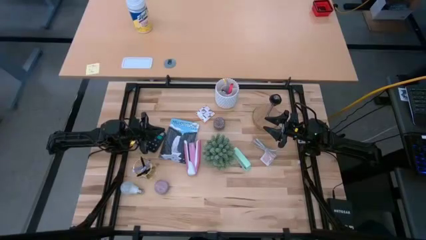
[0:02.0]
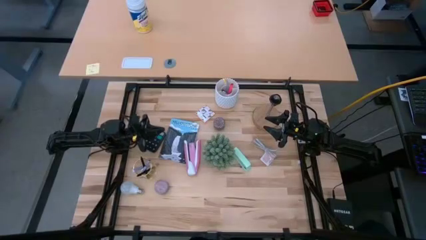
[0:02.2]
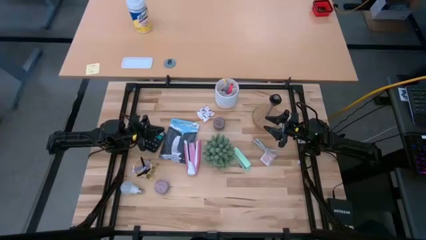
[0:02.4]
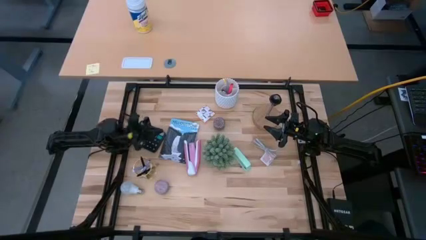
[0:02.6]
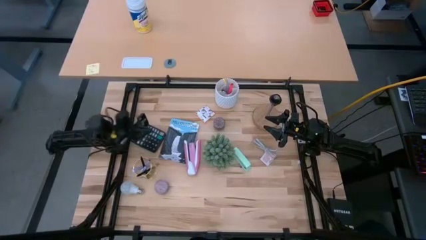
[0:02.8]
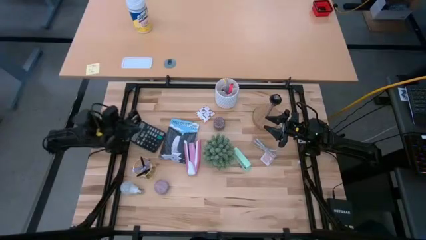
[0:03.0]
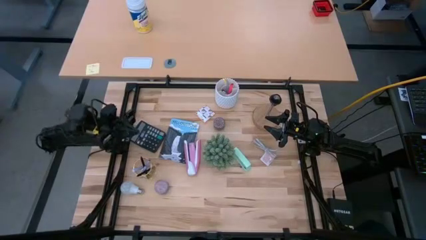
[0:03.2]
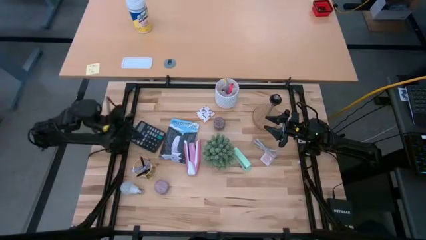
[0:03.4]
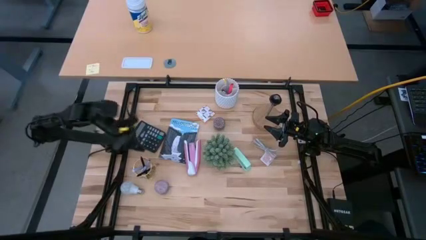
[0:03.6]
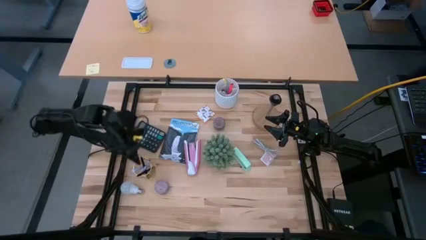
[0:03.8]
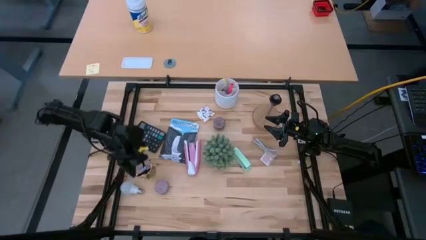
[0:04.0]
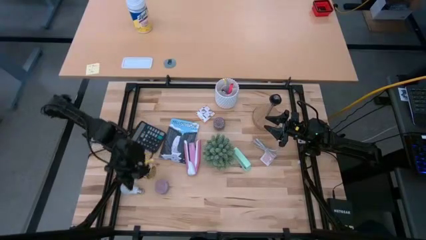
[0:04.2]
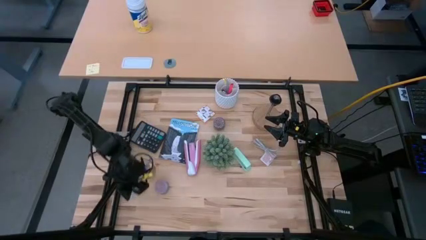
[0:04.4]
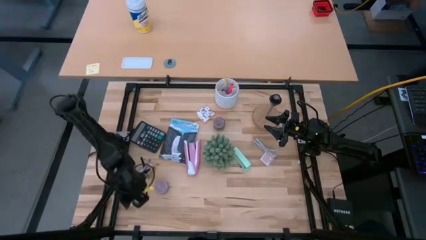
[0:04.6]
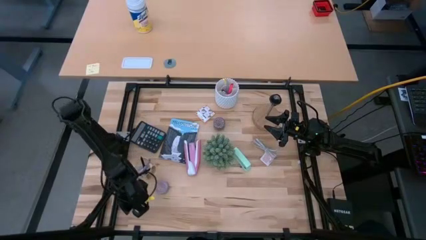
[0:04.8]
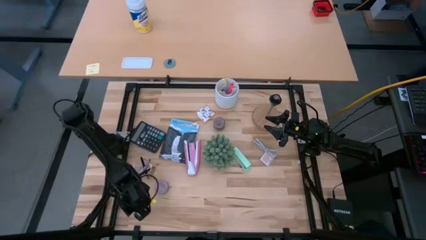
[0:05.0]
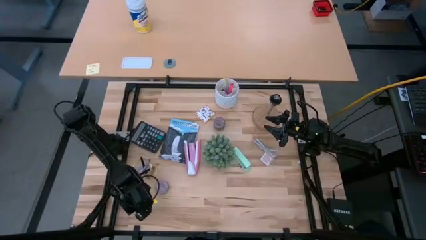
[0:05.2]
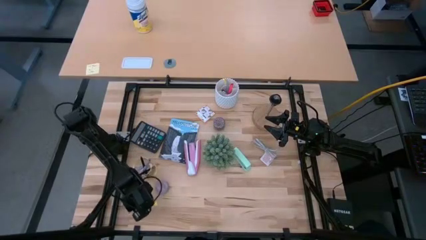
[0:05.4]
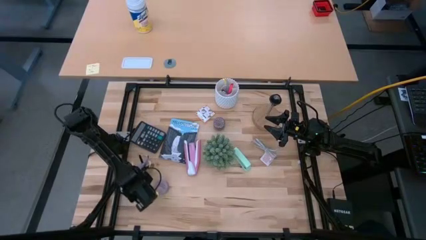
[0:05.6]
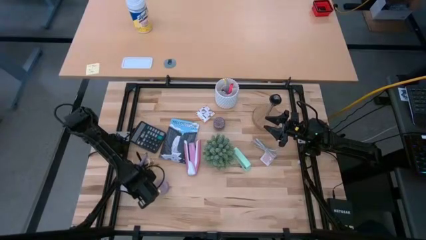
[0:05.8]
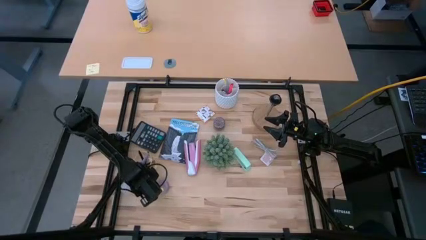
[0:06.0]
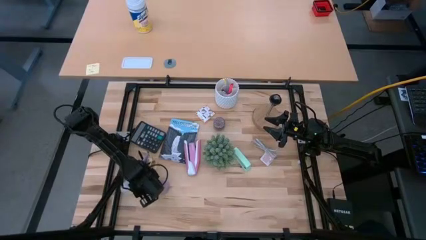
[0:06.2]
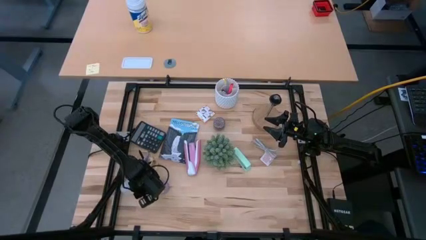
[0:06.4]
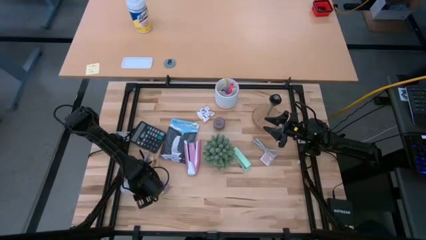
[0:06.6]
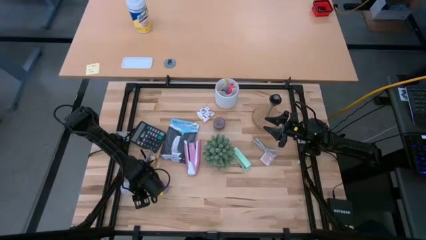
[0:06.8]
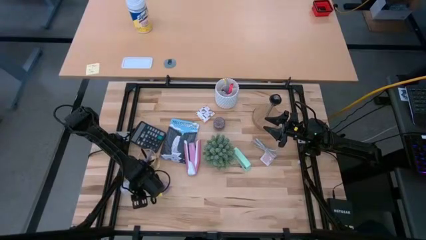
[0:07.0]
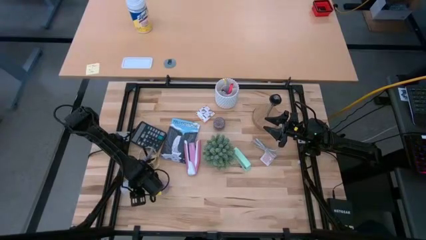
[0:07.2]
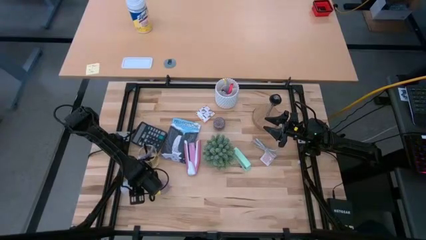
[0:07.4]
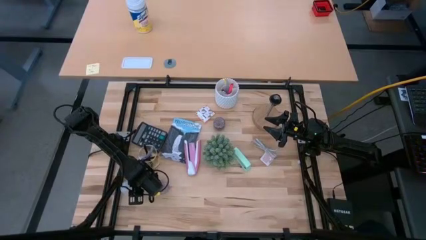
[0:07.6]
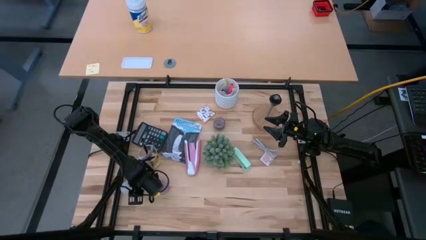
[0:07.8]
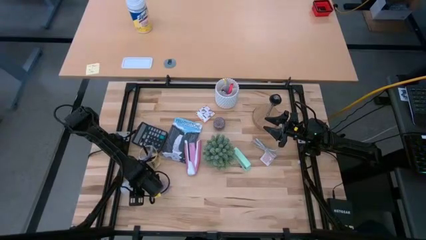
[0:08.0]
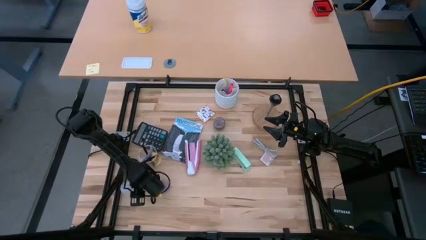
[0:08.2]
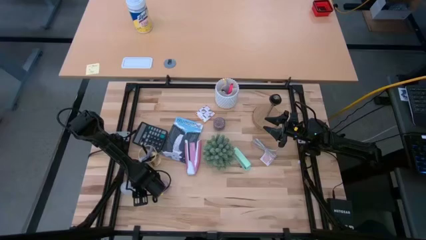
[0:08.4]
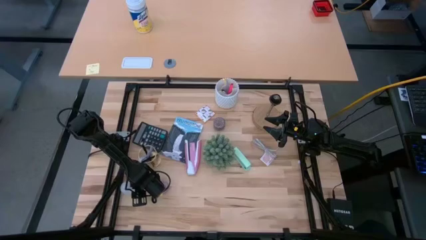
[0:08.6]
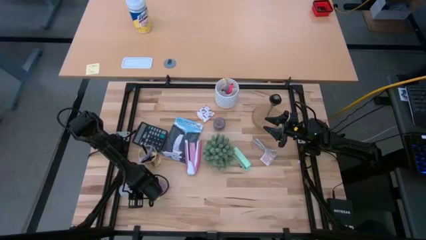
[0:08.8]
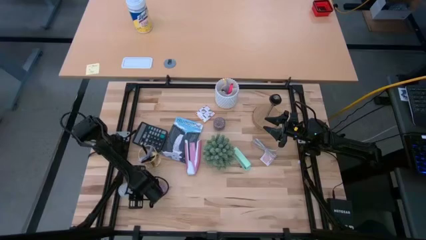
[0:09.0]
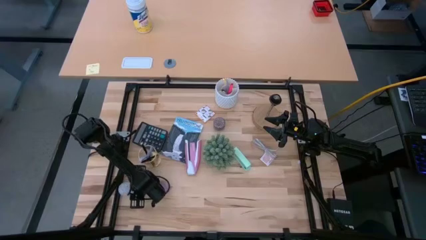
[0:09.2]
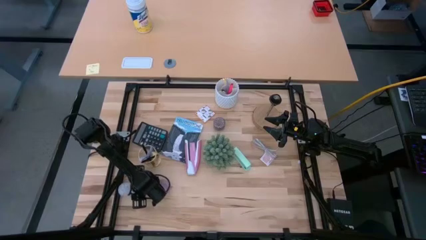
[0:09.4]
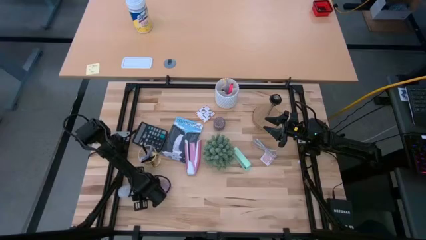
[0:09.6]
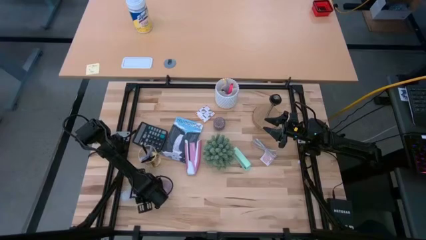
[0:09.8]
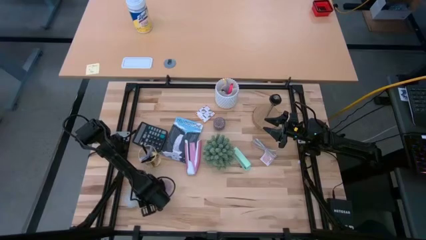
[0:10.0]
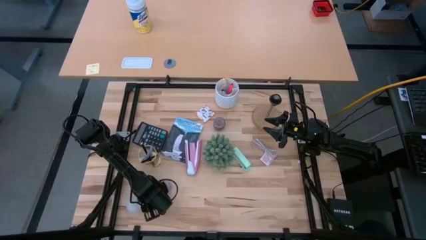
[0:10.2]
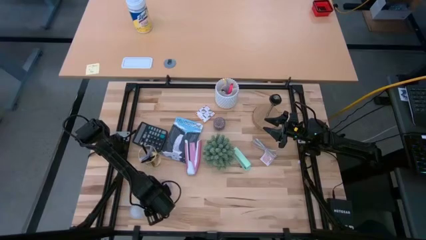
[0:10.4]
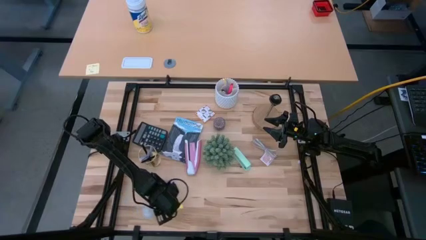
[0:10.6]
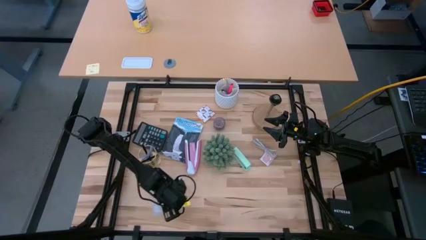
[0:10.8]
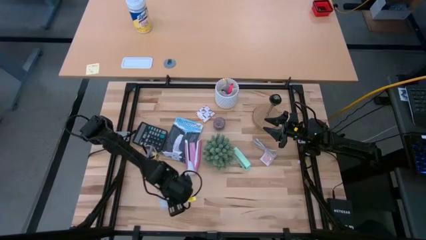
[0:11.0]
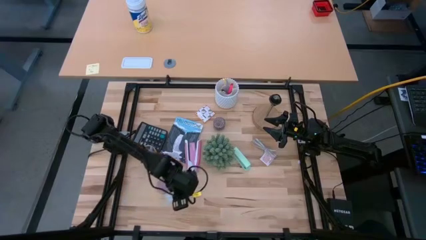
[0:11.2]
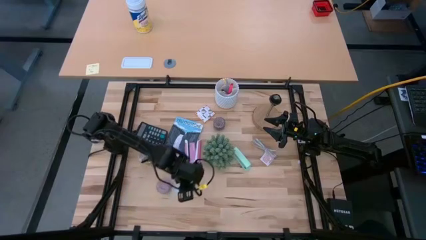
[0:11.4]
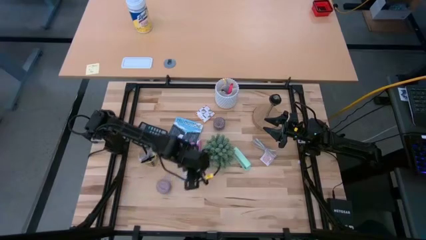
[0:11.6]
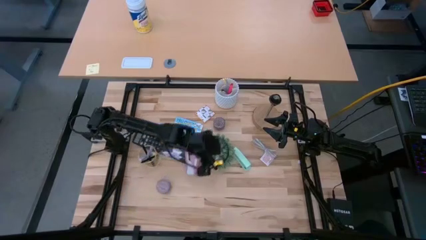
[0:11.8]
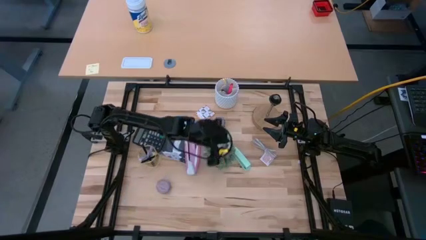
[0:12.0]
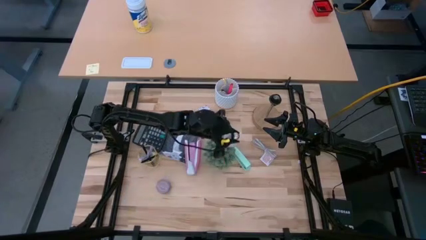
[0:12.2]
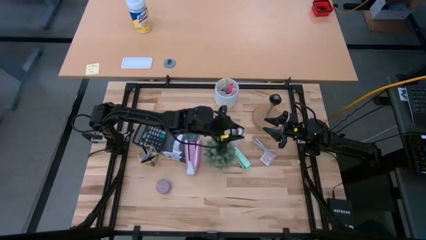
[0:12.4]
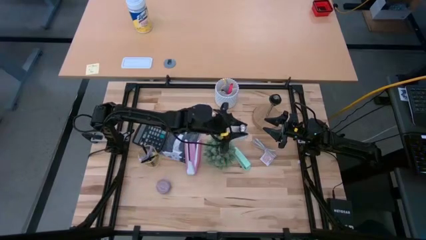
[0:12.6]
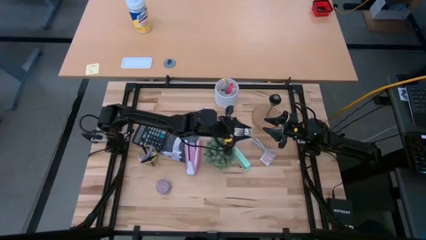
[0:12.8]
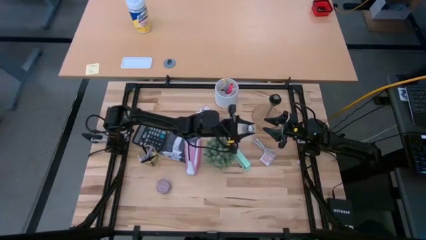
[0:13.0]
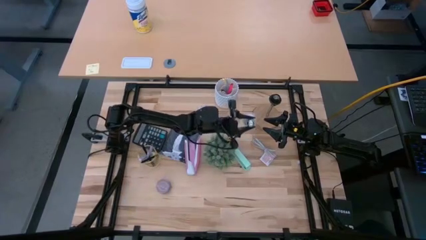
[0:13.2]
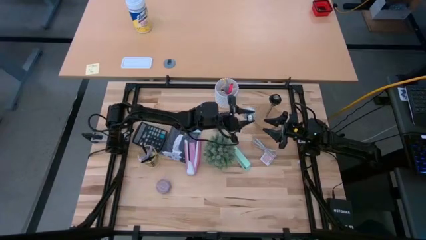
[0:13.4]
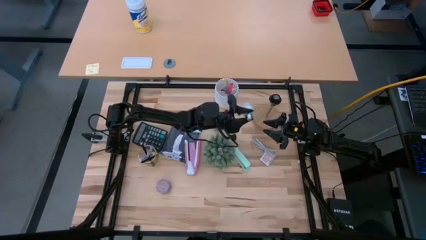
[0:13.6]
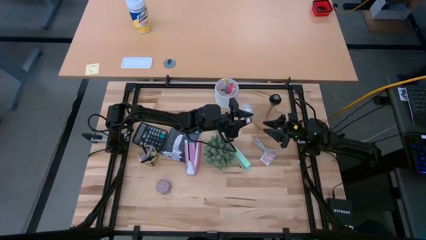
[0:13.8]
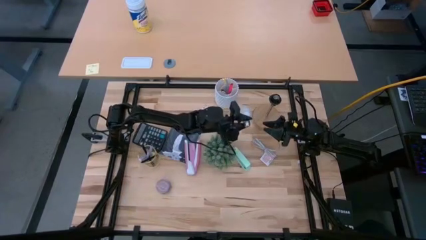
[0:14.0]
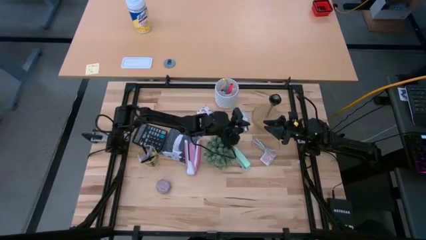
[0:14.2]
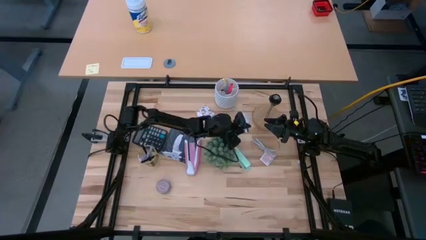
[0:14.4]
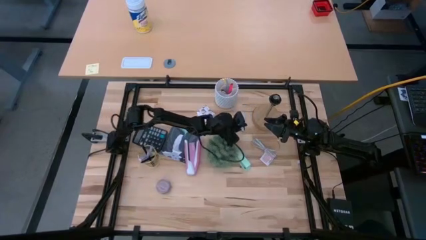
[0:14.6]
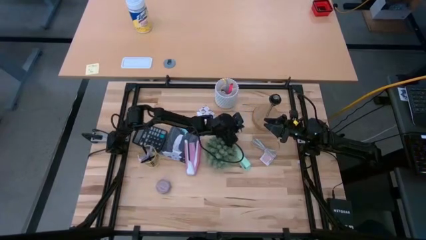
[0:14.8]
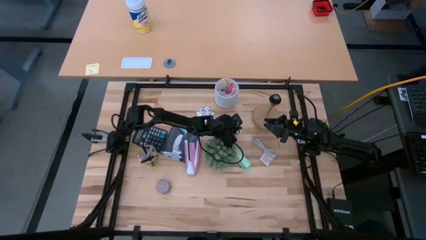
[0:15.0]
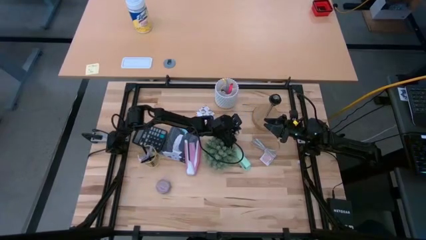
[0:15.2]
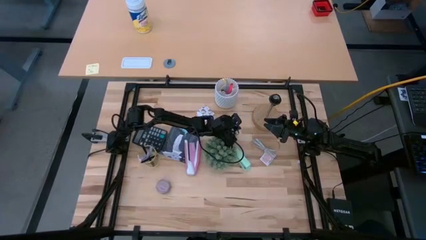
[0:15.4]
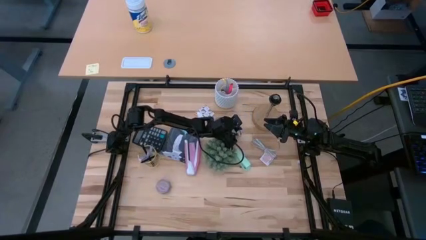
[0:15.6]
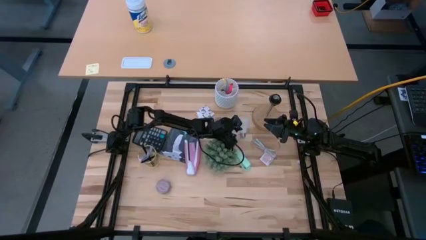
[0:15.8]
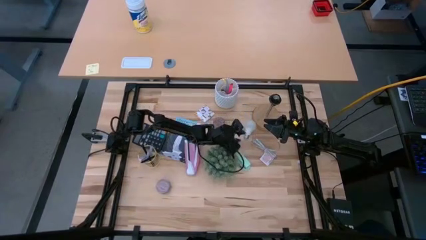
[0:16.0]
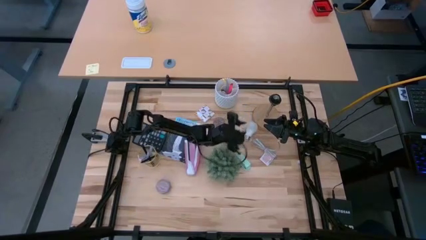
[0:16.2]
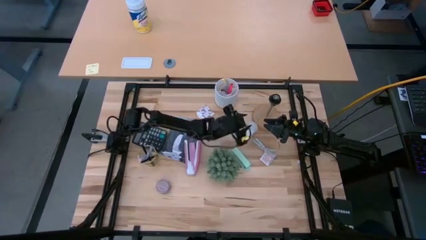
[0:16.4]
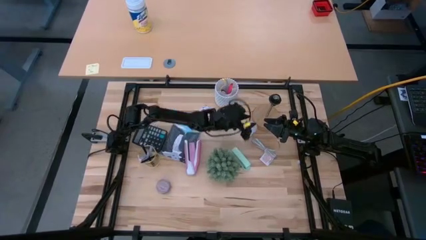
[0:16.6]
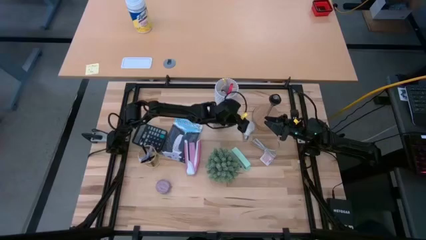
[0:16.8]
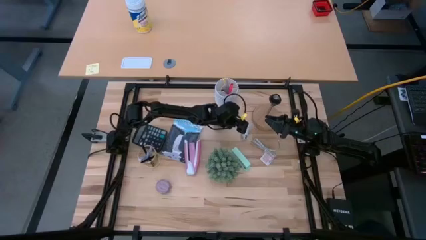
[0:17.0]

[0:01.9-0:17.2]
Task: Screw lightbulb
Insert the lightbulb into the lamp
